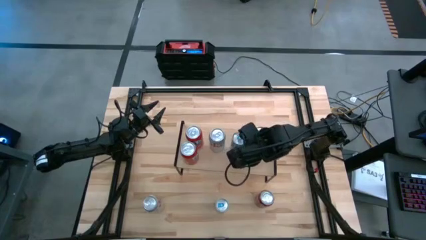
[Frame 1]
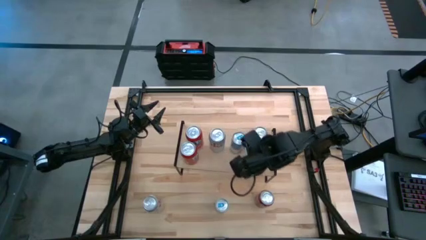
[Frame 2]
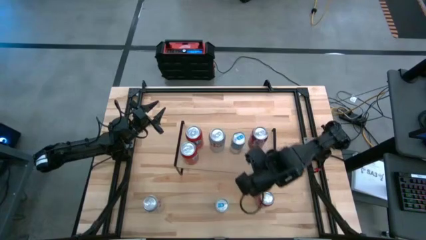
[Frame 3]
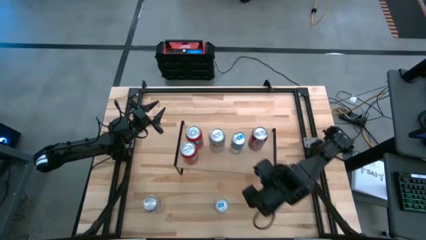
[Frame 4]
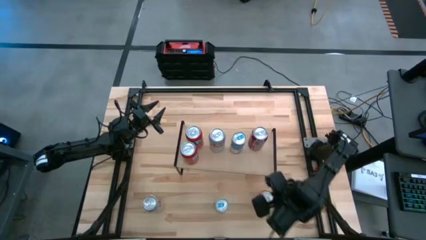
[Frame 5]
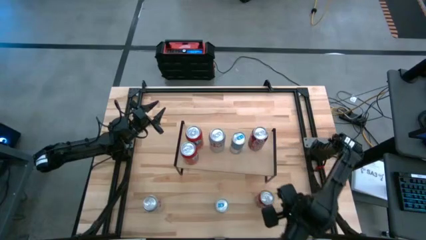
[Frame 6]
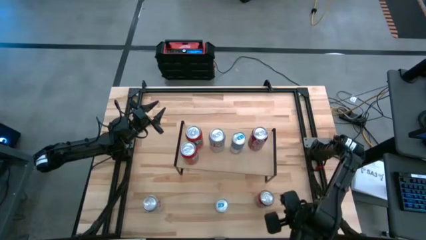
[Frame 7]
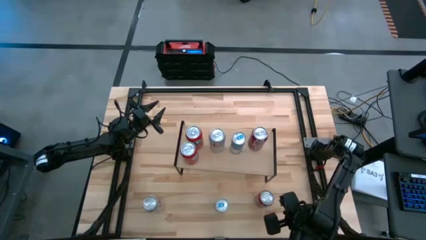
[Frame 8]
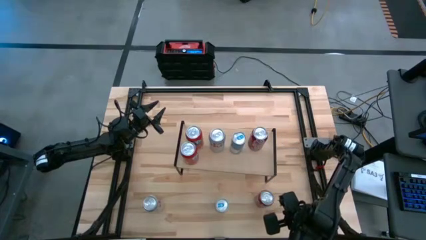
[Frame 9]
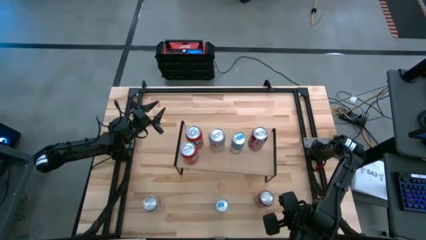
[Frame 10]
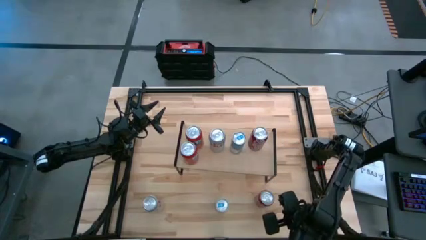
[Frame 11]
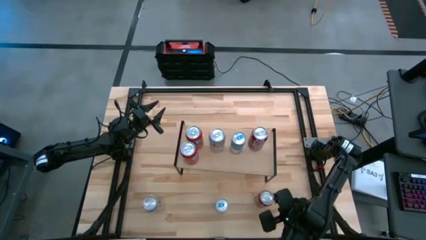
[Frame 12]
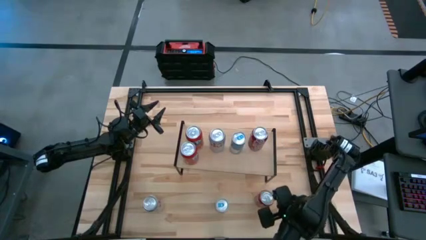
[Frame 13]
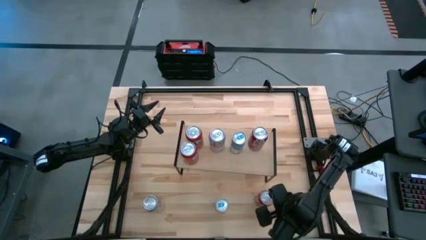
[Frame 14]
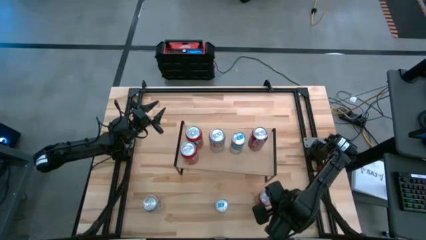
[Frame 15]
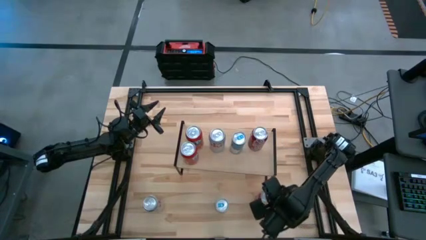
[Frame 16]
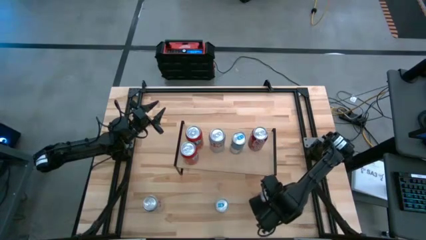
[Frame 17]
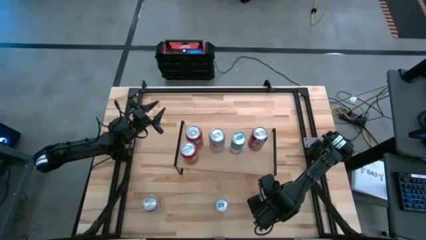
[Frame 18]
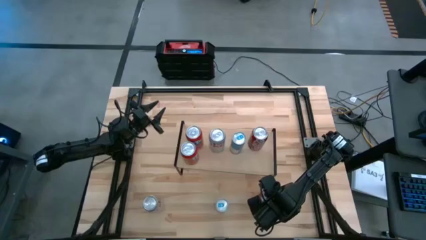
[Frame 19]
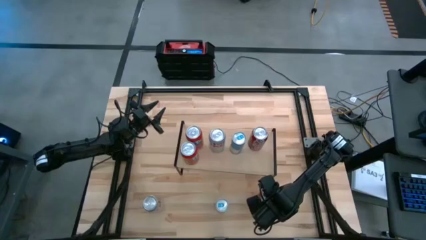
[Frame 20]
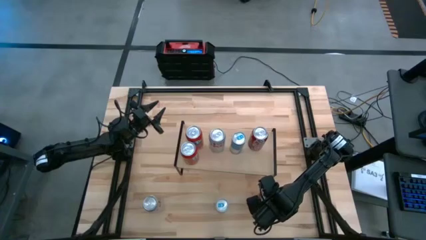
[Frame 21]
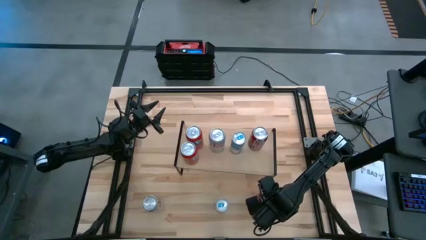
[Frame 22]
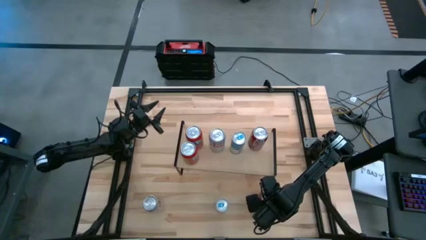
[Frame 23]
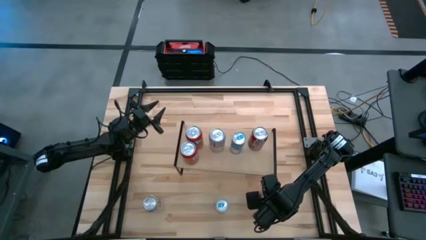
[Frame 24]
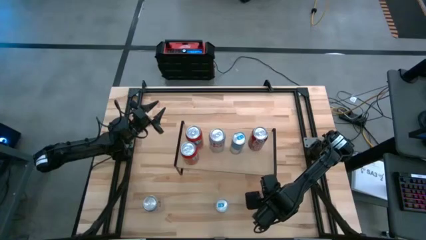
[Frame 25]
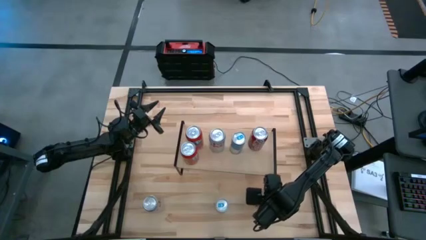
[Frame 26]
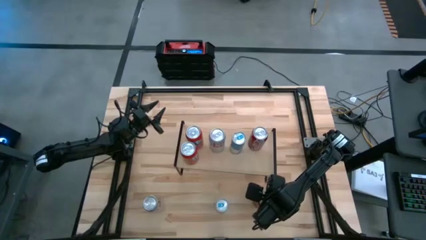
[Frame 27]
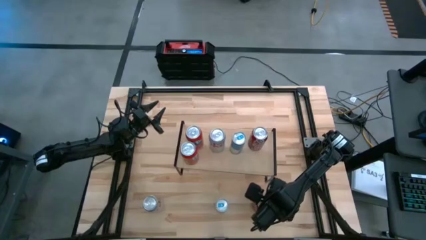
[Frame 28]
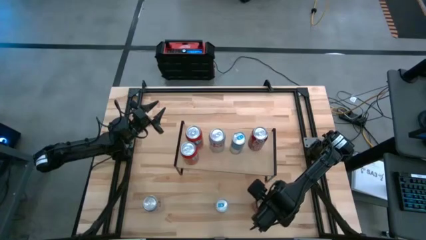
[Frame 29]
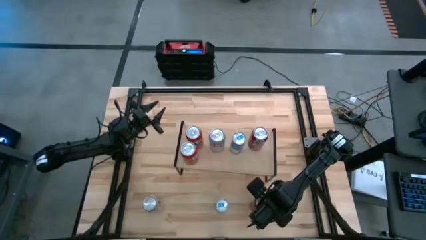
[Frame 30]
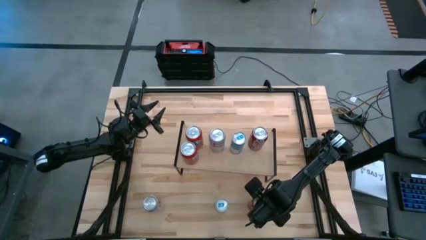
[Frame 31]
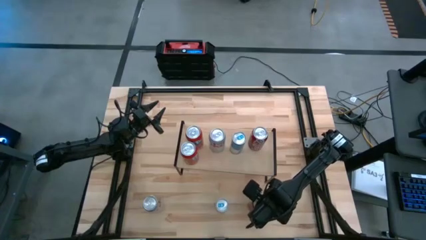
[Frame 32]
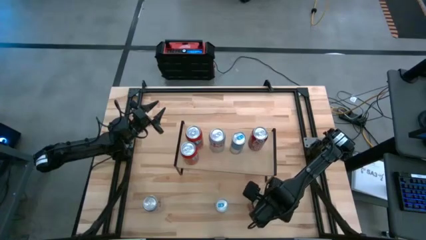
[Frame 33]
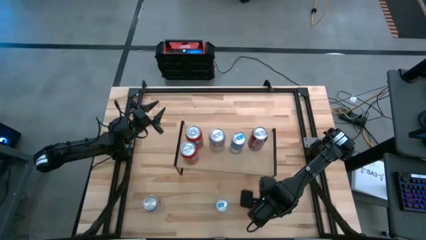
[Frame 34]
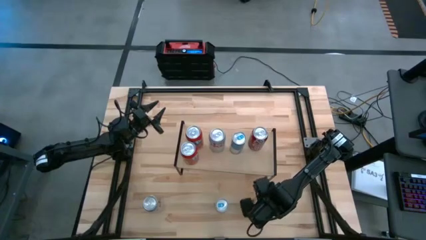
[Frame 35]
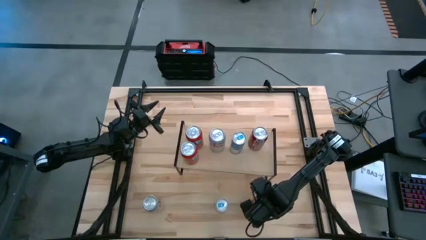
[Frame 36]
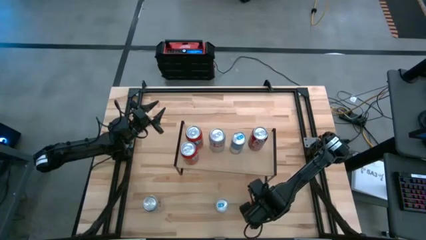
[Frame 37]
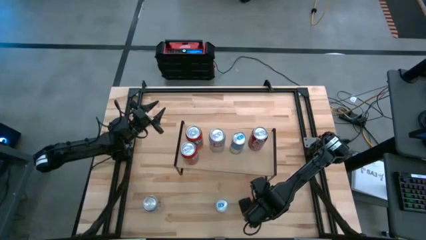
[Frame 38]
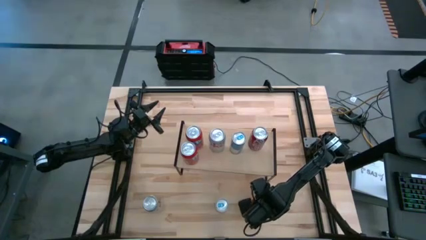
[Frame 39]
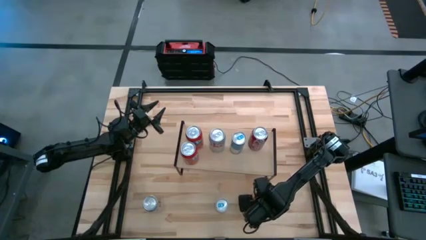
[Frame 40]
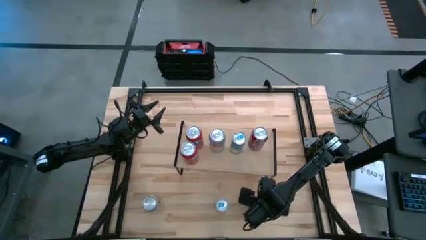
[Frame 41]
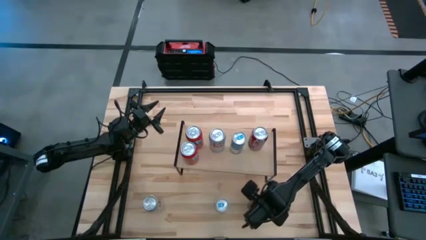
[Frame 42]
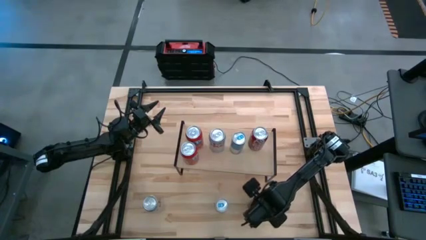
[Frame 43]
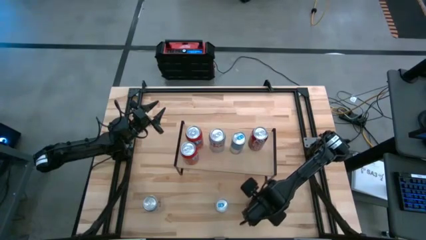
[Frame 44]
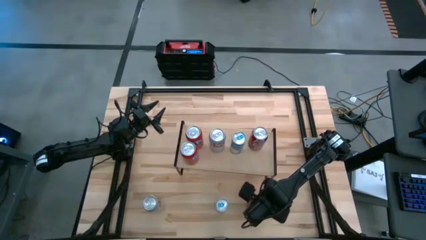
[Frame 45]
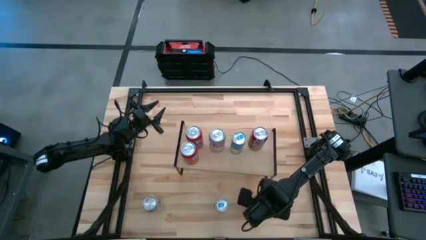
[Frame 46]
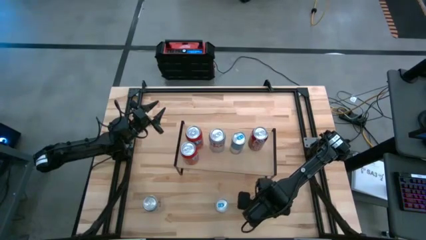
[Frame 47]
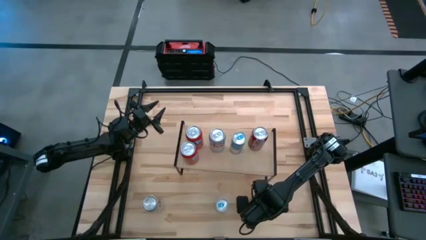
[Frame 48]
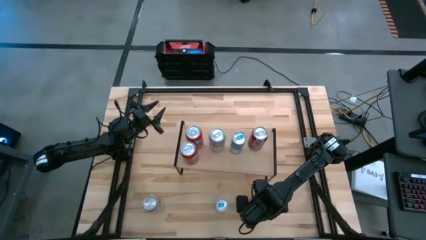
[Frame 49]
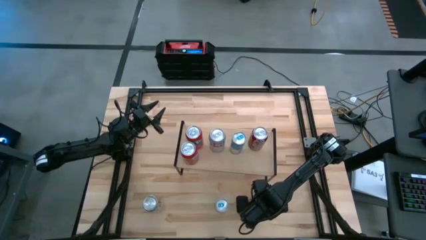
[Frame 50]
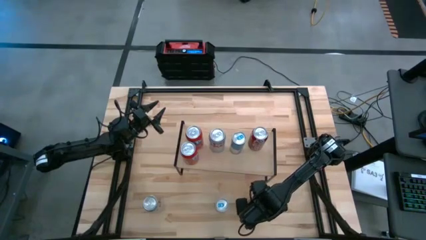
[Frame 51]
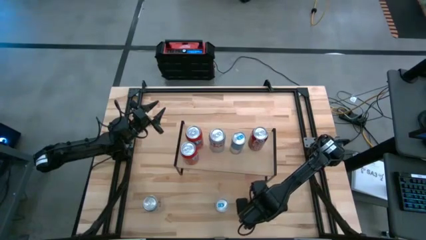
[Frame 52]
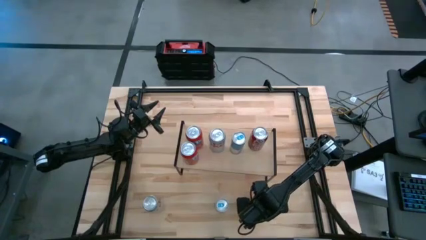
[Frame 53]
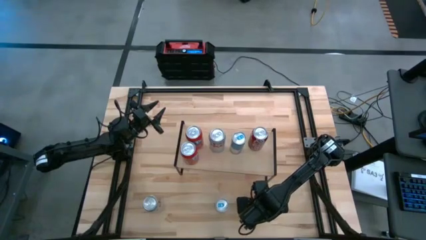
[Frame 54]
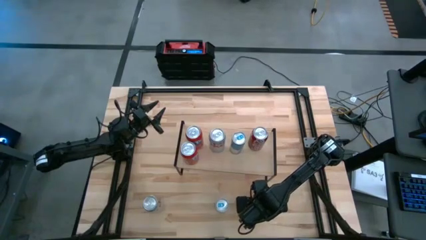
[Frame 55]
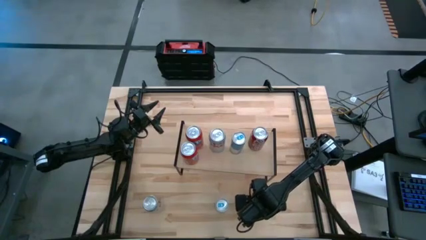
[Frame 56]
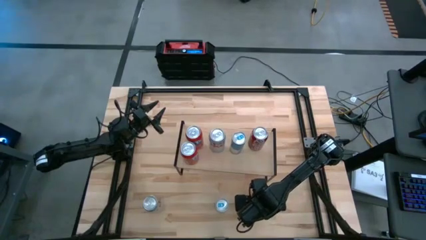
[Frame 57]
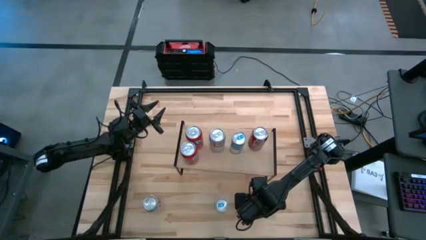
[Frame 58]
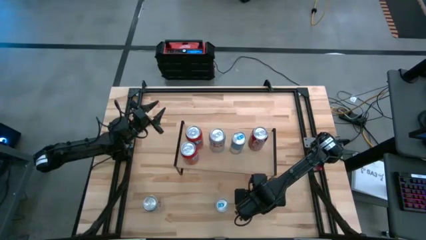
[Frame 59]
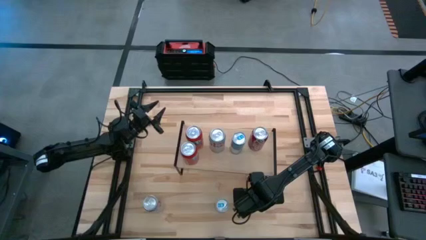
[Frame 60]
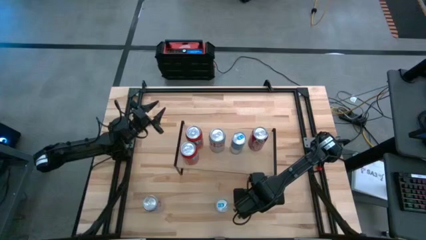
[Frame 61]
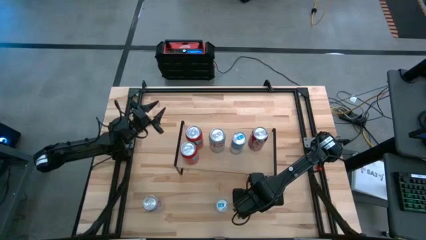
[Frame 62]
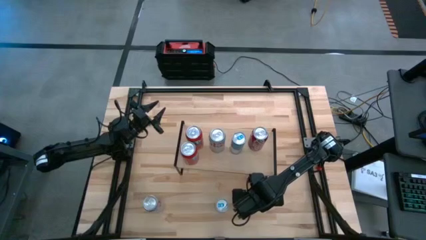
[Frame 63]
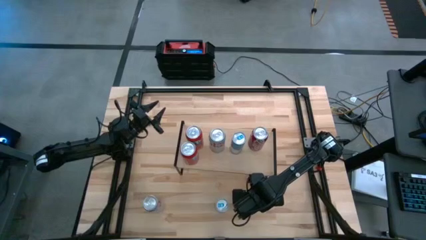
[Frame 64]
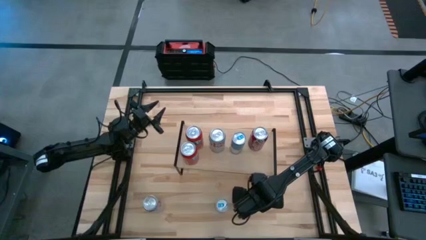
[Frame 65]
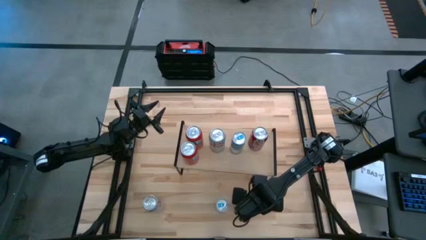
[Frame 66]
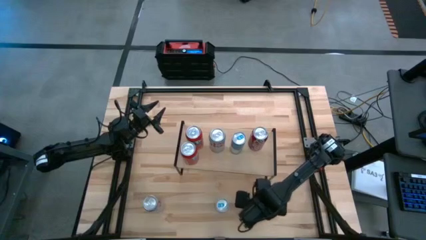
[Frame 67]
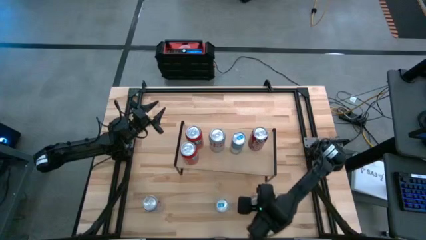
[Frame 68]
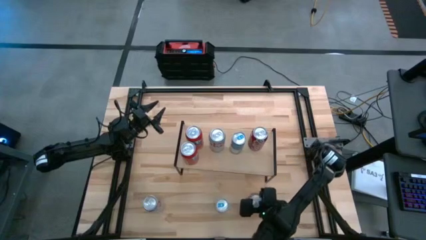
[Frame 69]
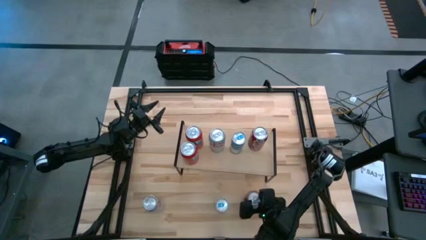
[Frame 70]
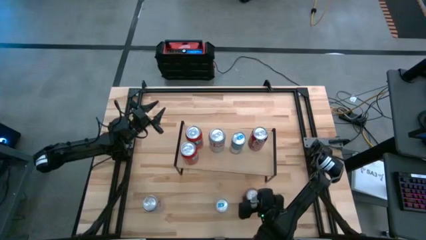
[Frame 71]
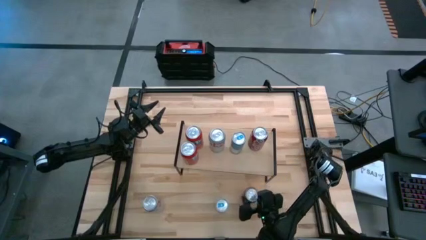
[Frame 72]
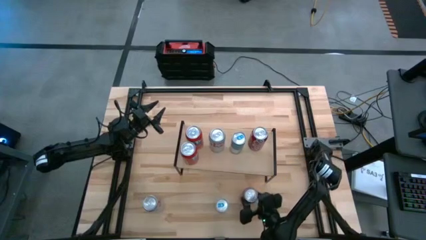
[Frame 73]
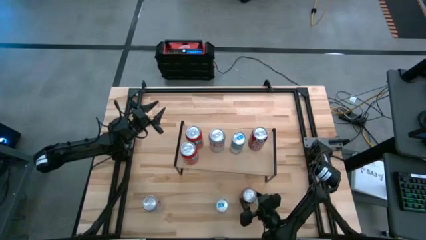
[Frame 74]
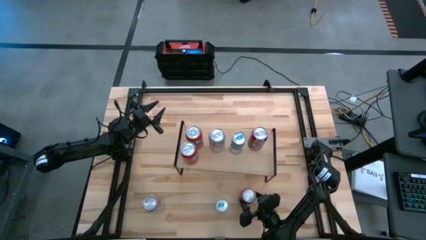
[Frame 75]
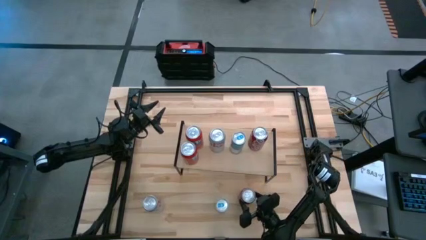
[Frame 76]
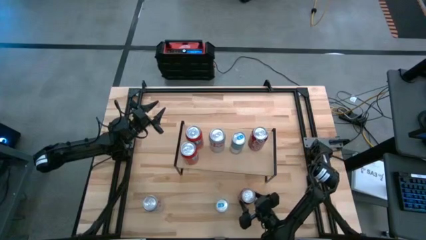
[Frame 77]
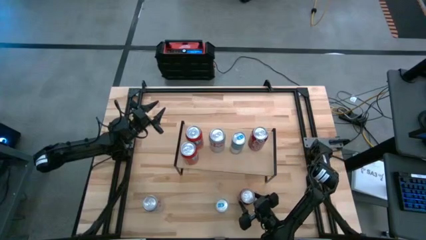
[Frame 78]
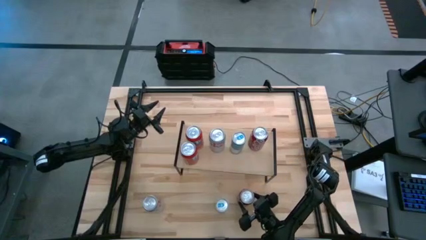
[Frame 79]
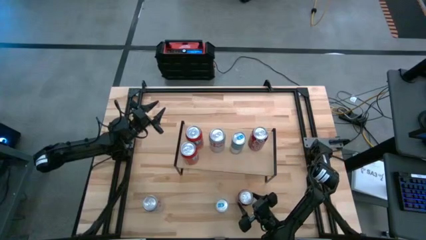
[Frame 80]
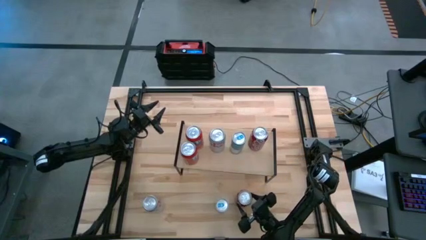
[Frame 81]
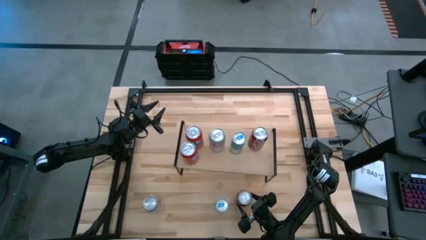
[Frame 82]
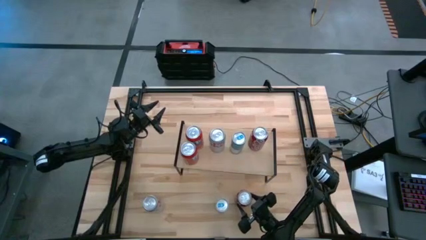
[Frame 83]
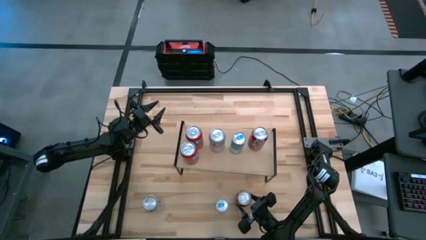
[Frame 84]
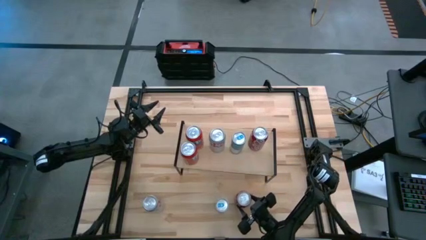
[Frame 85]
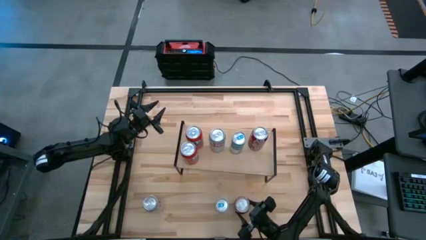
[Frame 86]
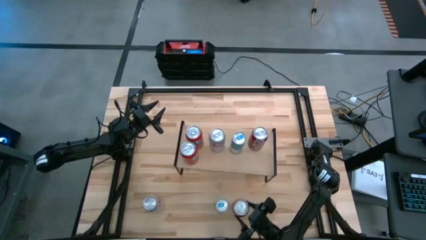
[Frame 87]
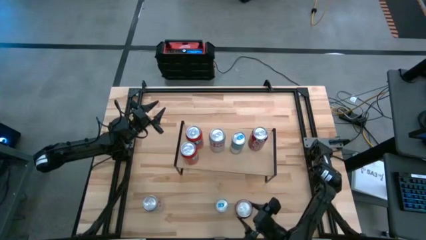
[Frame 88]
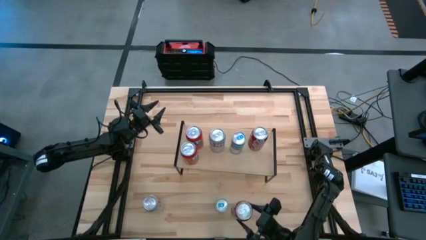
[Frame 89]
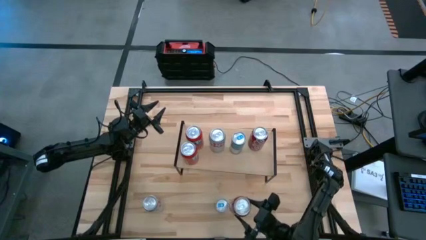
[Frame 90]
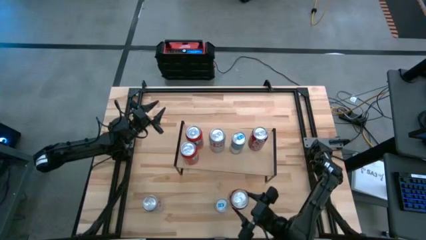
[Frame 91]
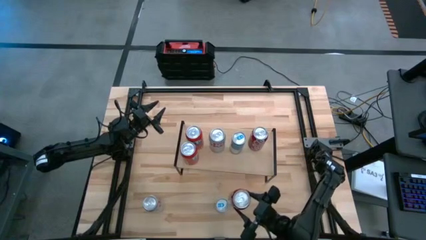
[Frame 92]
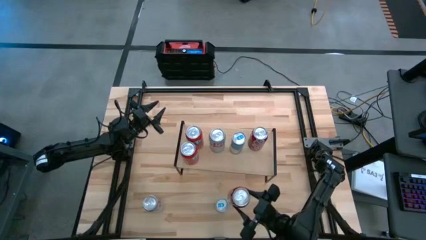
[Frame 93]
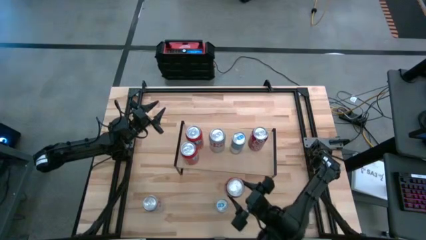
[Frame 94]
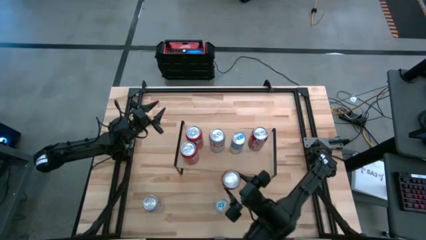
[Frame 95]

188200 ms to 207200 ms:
Task: Place canned beverage on shelf
Put the red soda can on the shelf
